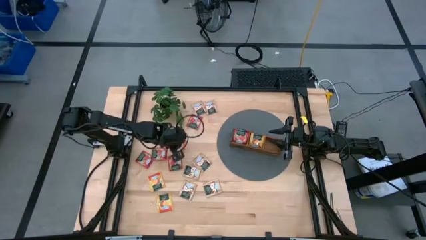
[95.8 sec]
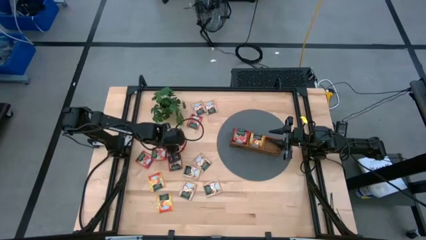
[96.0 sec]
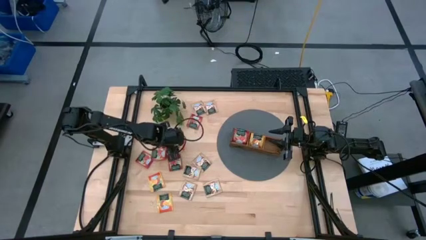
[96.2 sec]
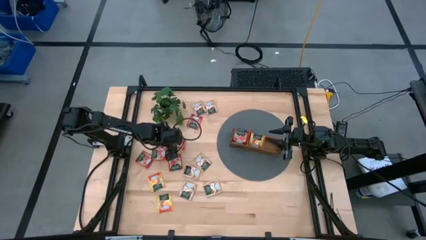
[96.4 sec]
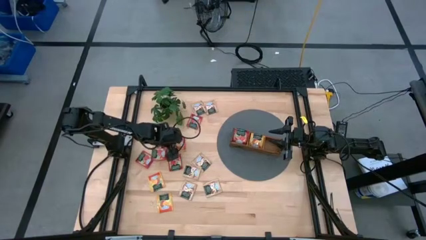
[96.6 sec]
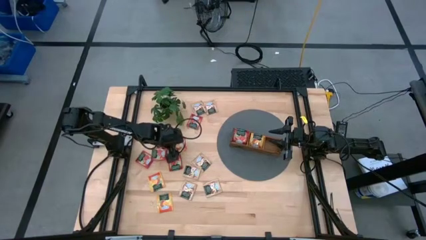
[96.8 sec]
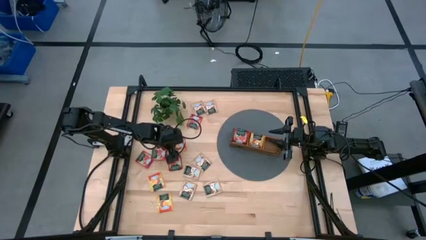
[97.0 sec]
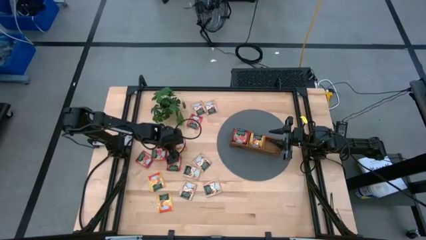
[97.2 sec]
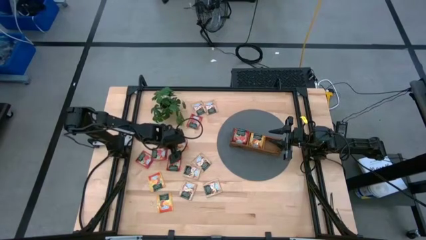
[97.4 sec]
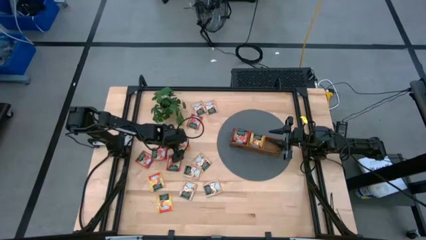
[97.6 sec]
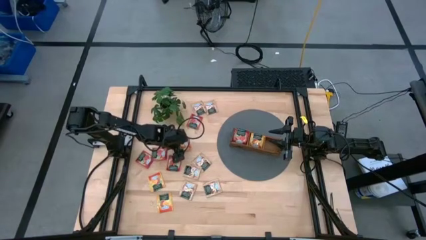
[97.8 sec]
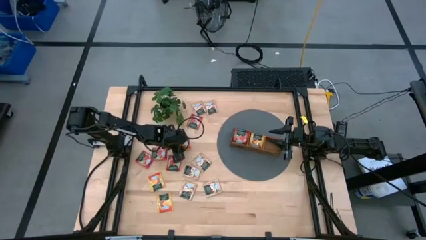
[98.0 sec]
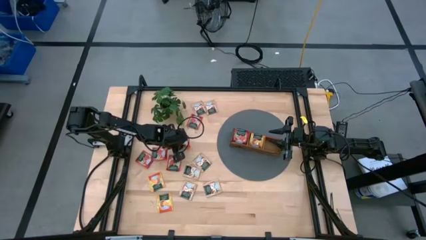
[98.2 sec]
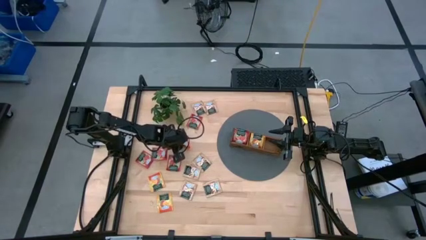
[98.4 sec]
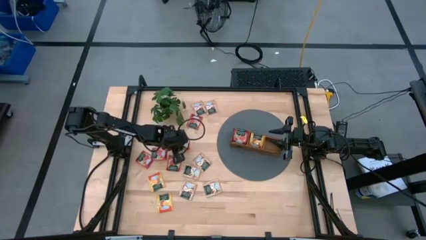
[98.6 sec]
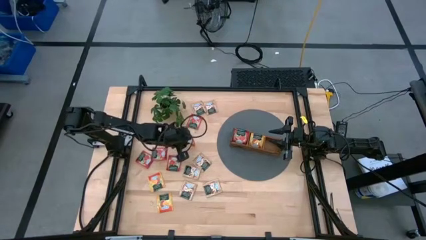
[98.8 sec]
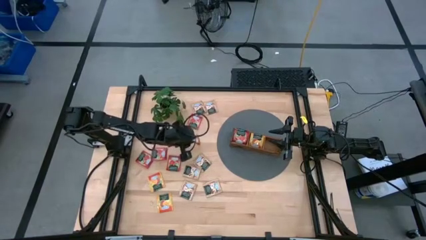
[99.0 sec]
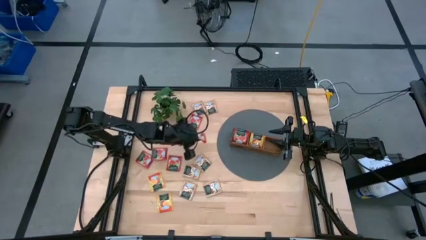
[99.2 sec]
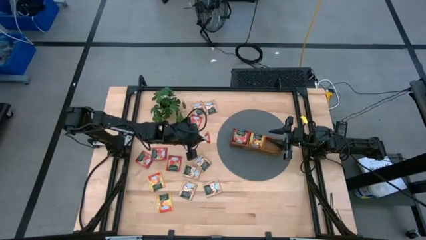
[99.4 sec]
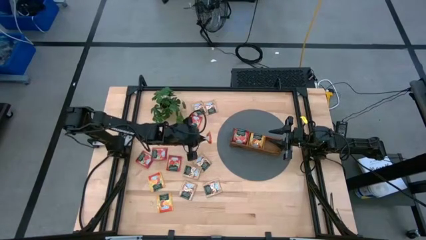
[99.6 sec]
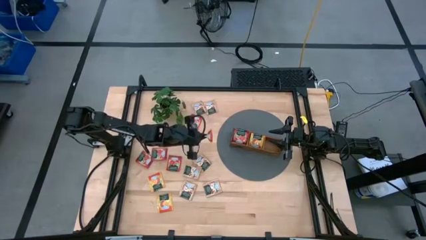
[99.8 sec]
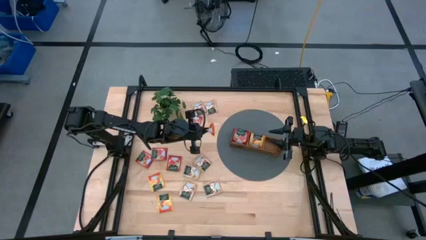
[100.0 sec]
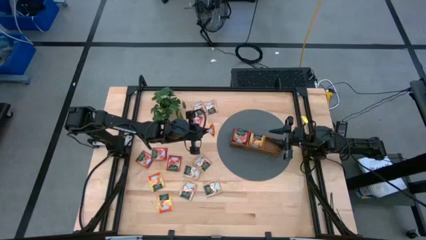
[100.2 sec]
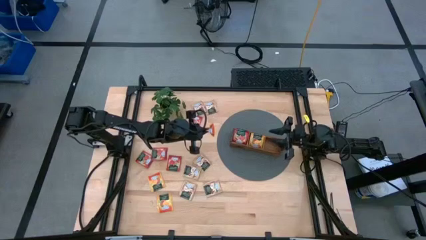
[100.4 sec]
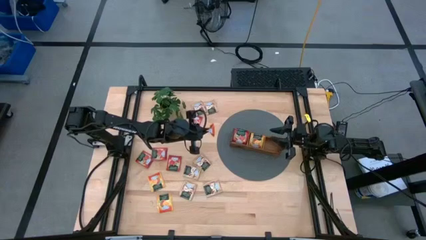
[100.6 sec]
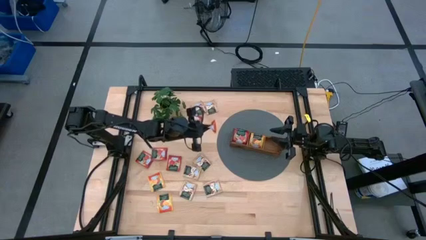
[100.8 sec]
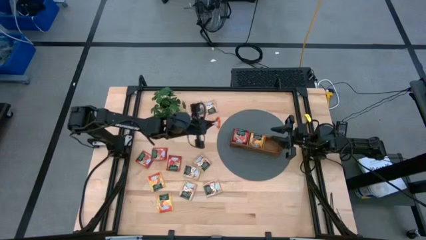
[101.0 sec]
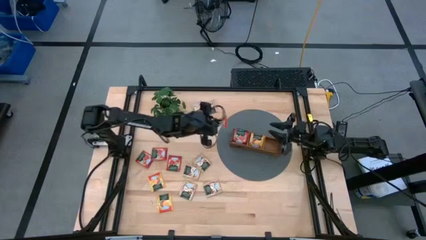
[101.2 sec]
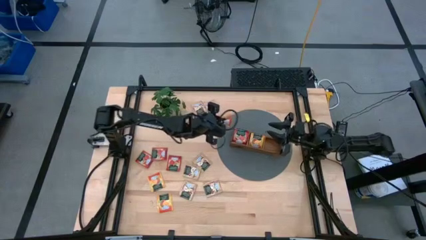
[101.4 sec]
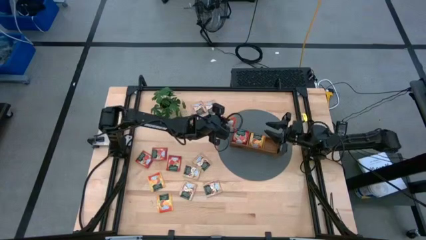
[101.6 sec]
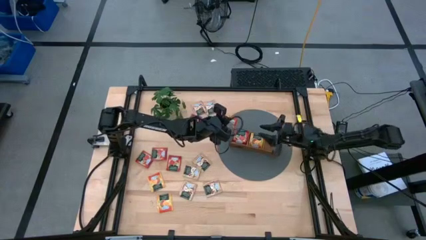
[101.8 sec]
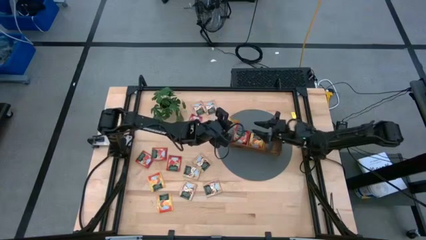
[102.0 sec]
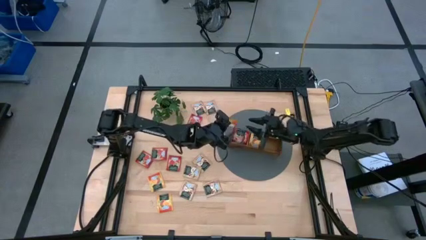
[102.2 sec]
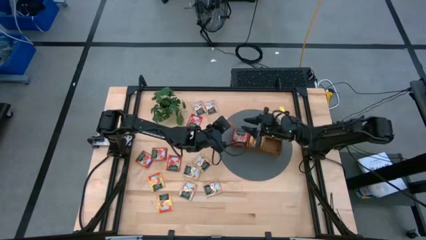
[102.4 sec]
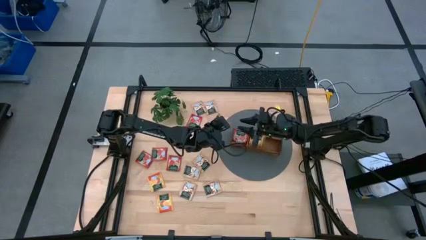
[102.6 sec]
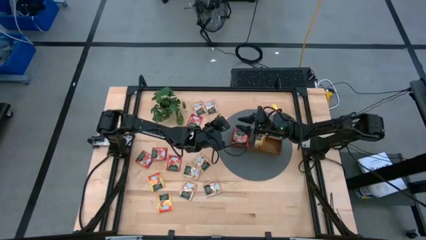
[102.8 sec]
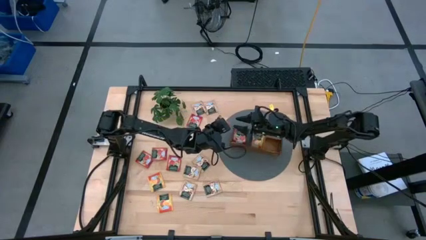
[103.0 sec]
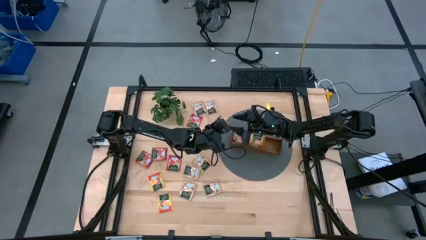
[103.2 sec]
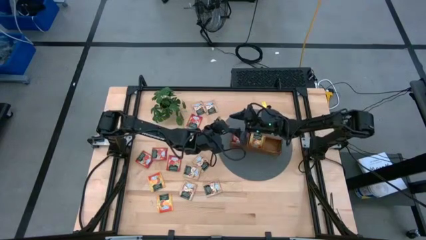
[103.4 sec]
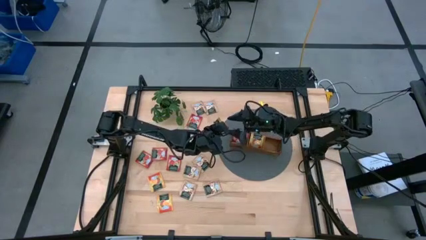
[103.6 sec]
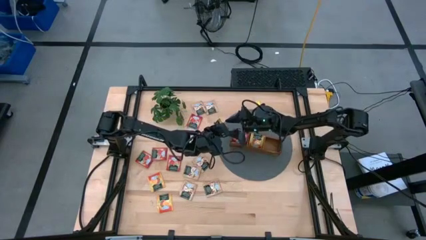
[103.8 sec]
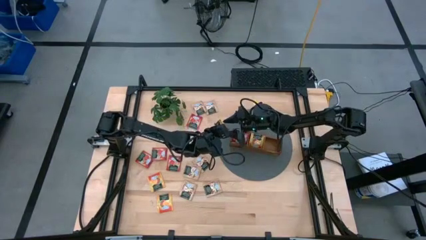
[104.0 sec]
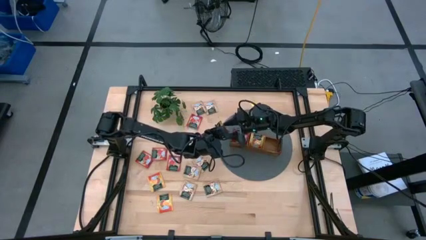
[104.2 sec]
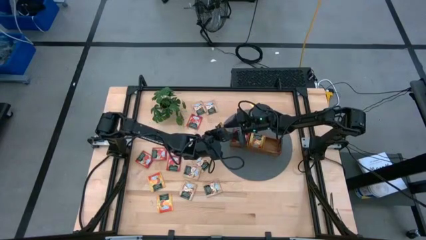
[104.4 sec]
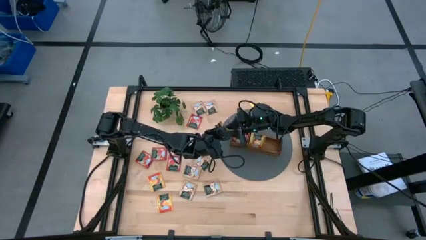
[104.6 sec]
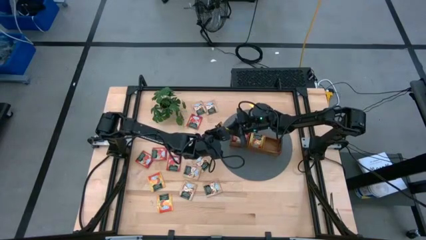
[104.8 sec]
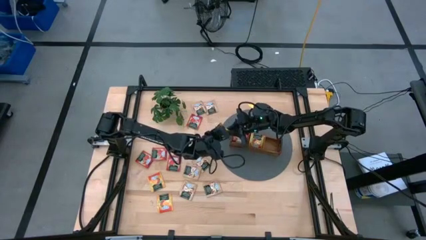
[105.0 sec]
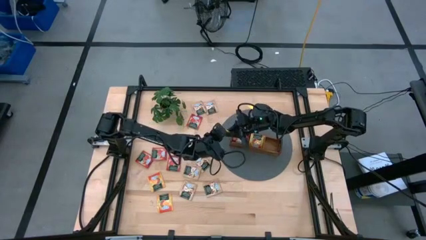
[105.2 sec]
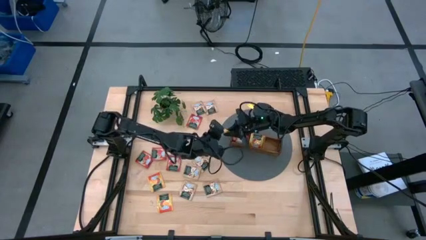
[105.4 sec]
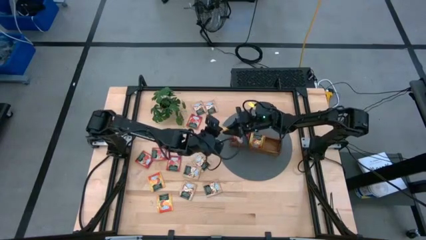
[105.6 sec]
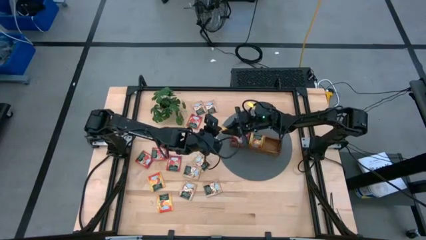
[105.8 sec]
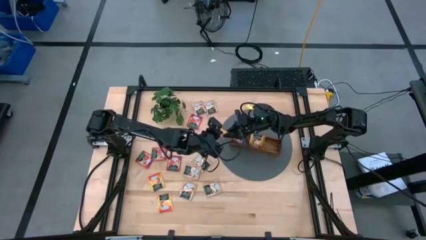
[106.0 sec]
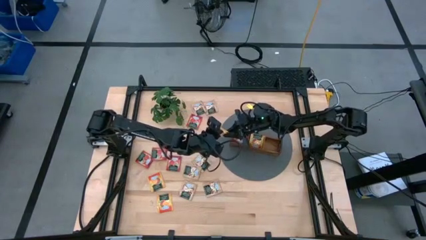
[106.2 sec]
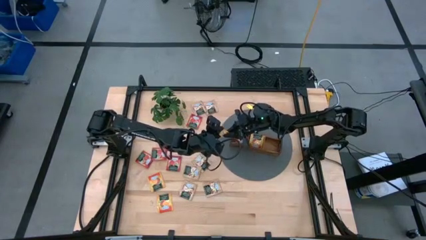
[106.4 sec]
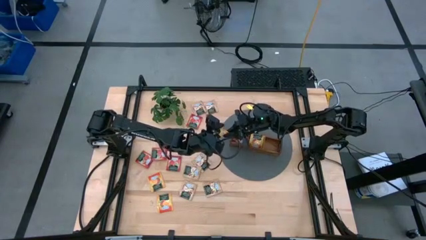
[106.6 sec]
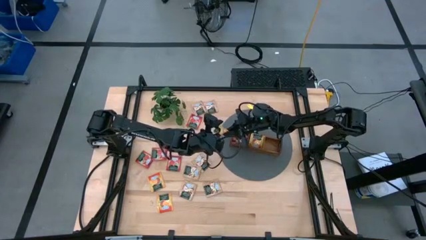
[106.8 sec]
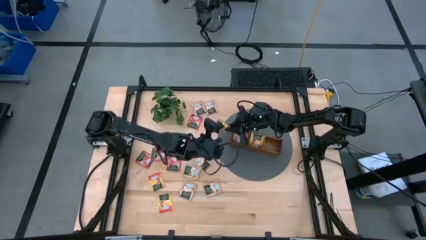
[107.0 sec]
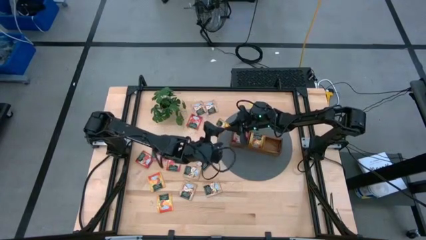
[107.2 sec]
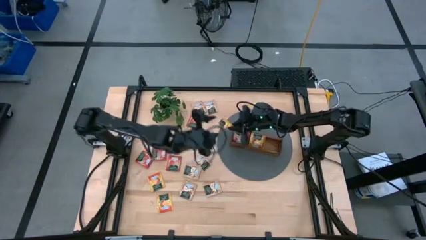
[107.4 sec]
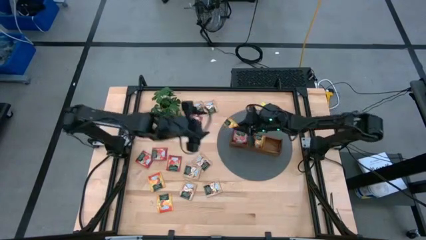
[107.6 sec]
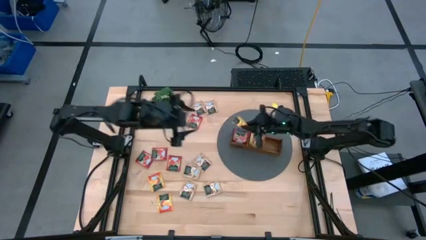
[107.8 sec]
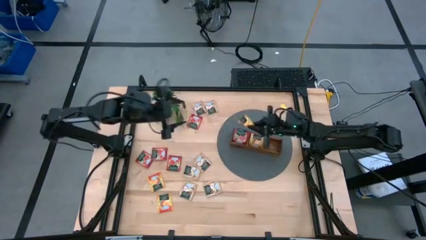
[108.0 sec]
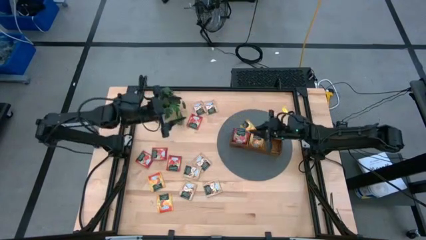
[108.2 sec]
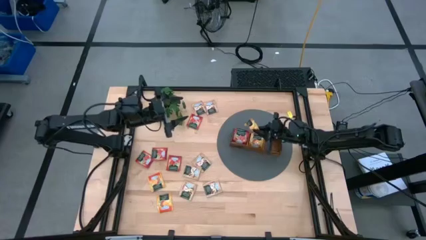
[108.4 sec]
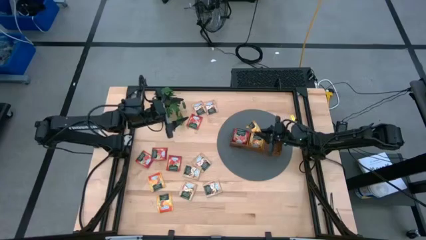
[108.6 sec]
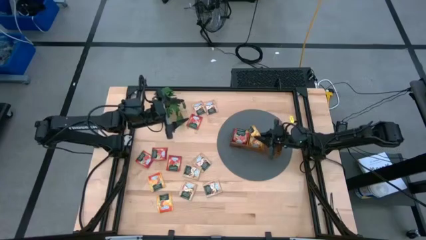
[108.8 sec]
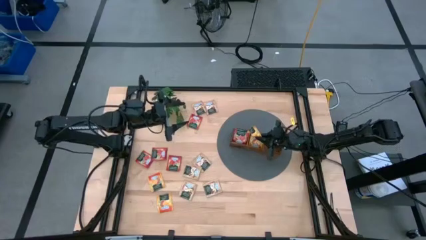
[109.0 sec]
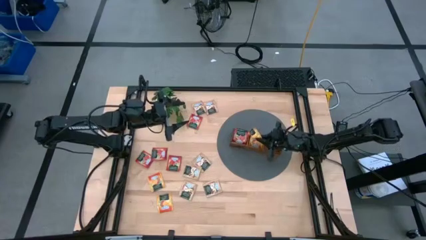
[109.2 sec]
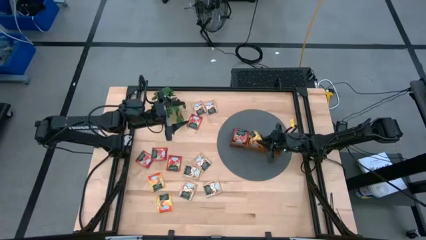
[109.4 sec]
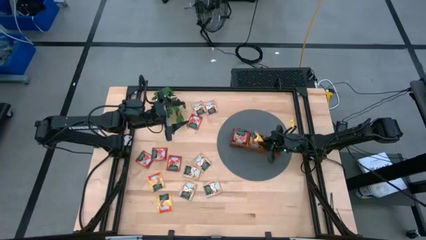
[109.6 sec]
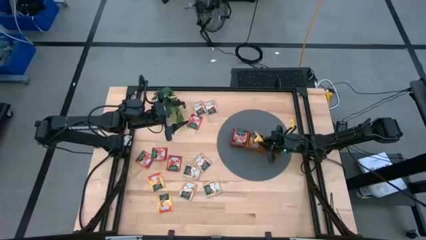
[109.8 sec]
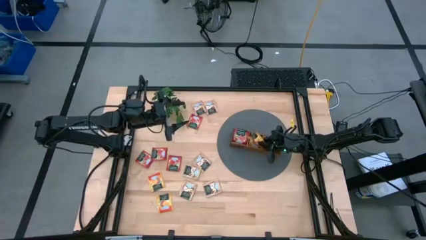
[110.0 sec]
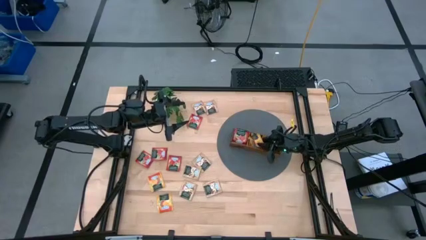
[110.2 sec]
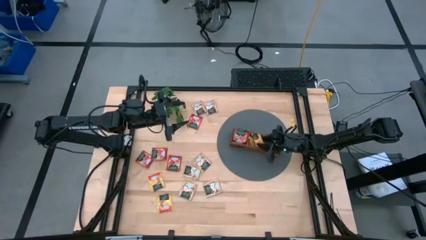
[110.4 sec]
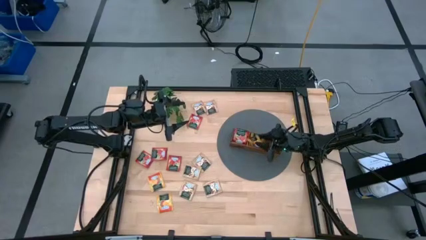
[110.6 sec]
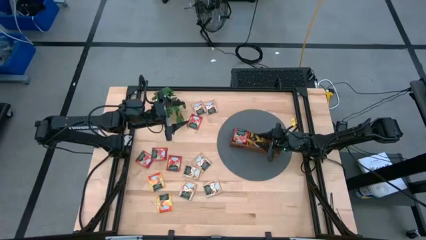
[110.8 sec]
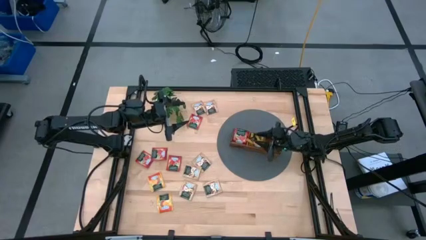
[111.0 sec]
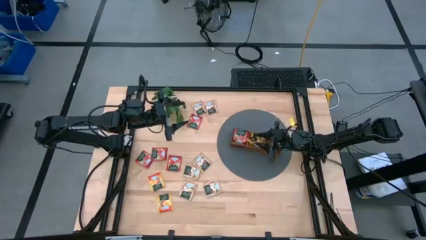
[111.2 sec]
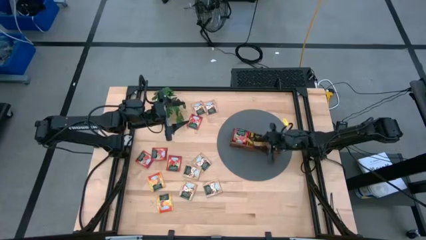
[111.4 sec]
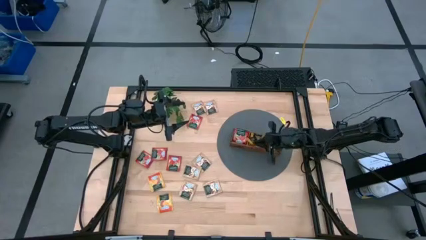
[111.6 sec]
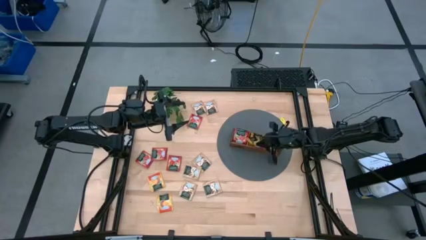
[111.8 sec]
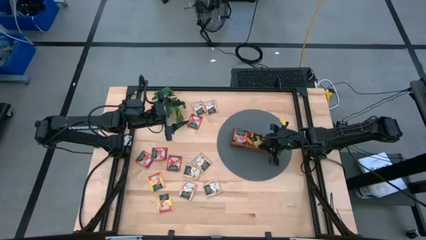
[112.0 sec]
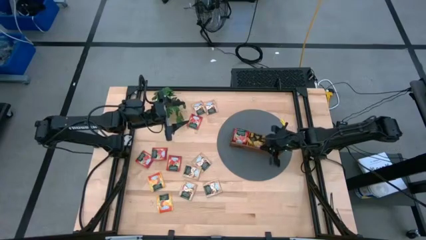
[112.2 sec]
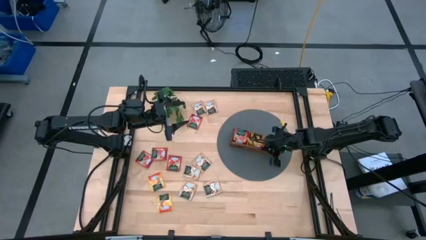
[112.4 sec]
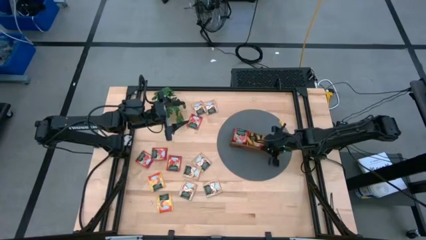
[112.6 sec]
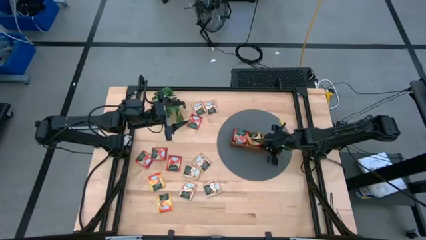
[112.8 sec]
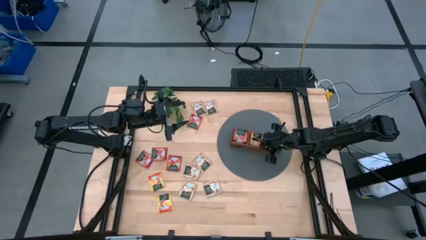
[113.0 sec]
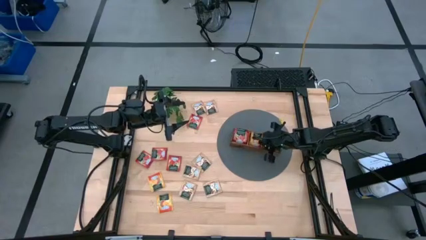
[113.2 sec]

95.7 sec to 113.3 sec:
Task: Pick & Place Tea
Put the yellow tea bag into the middle section of the wooden organizer
